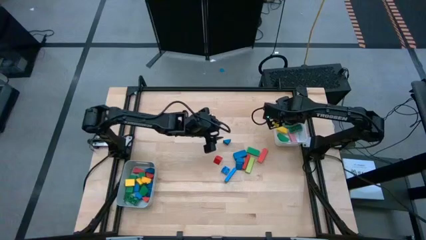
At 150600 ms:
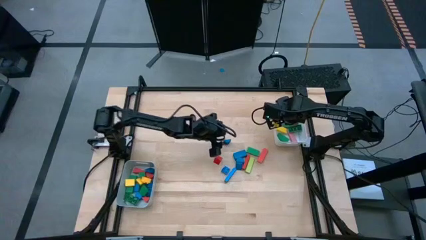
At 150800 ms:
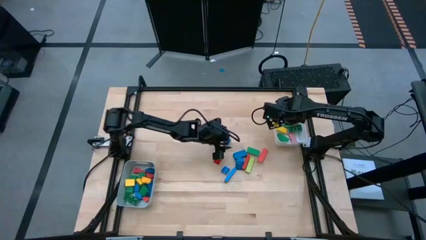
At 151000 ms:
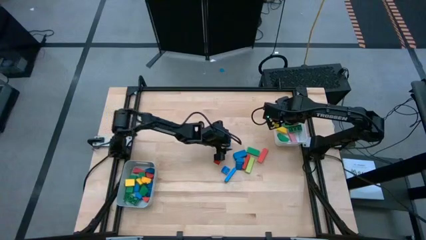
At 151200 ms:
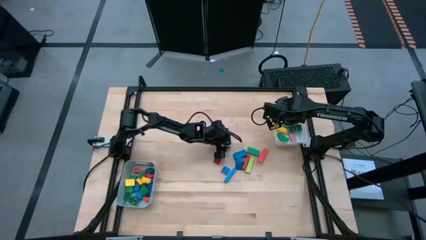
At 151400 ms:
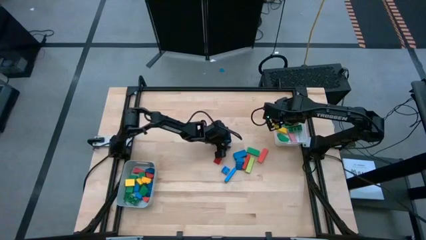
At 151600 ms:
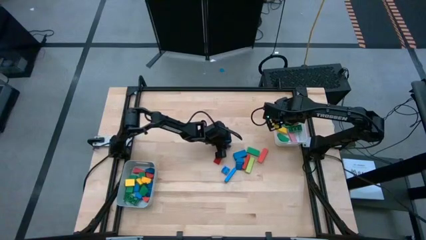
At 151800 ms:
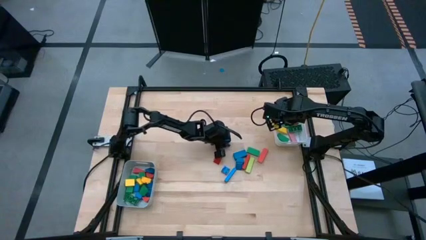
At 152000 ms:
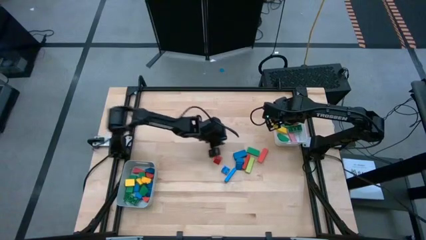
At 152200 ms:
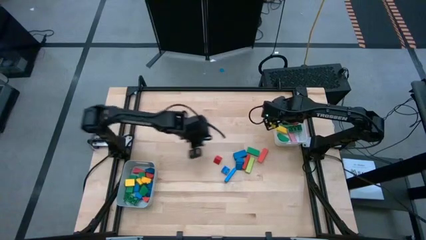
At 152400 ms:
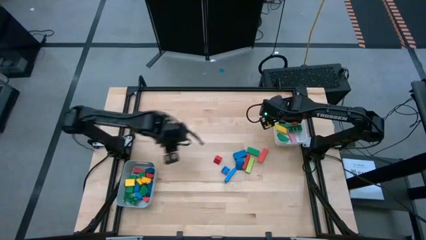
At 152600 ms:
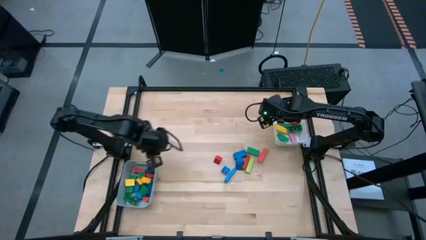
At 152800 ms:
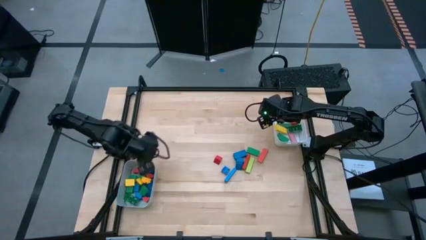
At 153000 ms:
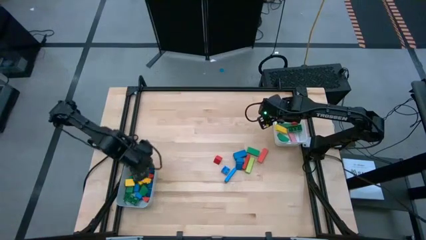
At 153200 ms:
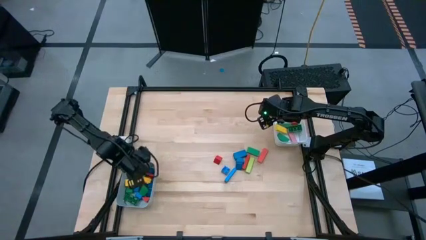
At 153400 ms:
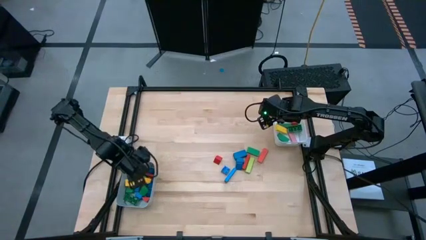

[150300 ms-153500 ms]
Task: Sort blocks by size
Put the blue triangle block into the gray bin

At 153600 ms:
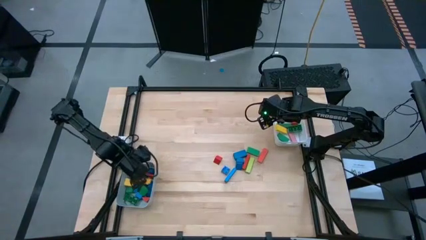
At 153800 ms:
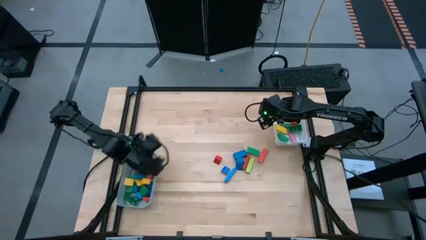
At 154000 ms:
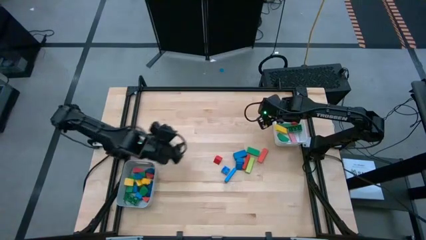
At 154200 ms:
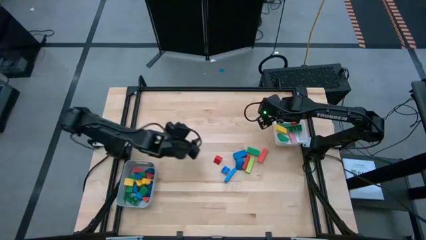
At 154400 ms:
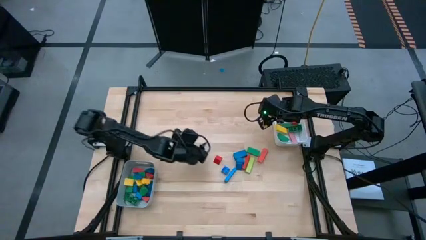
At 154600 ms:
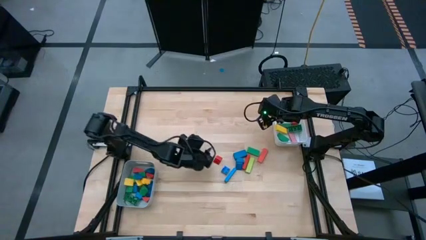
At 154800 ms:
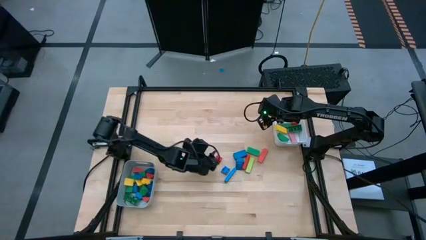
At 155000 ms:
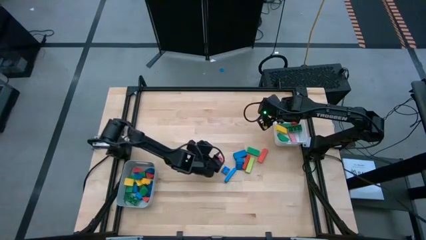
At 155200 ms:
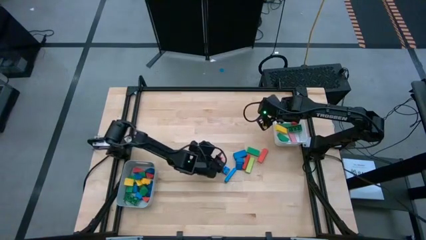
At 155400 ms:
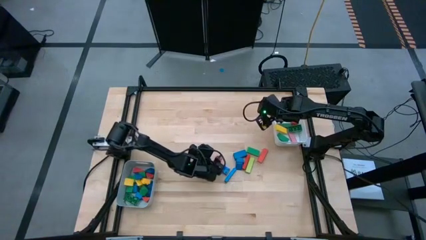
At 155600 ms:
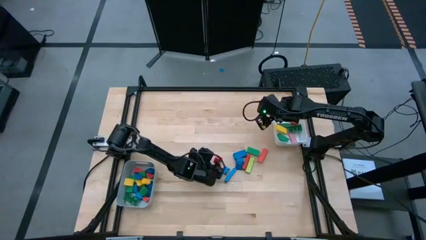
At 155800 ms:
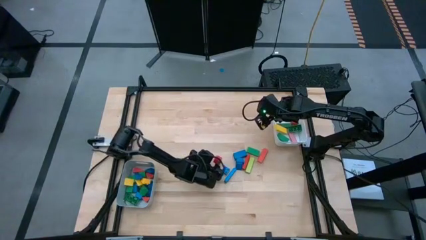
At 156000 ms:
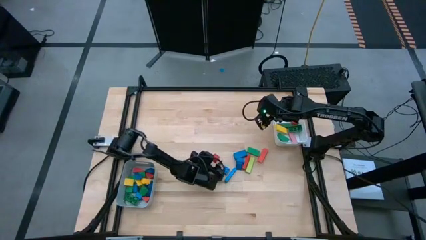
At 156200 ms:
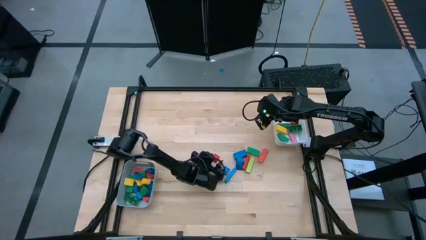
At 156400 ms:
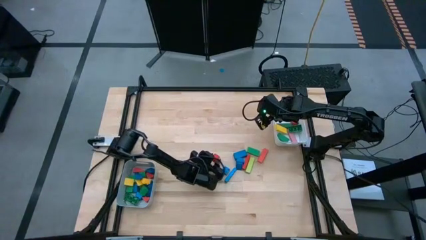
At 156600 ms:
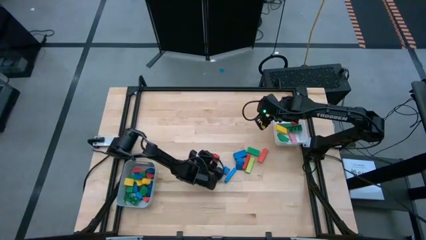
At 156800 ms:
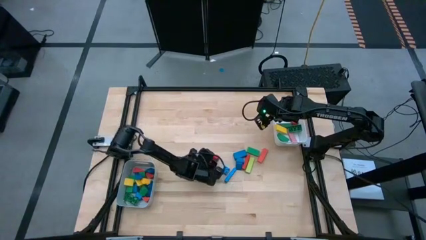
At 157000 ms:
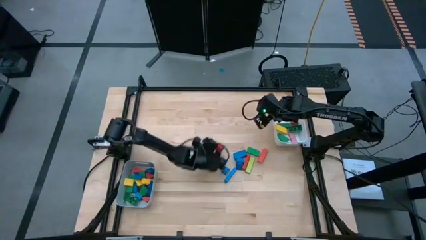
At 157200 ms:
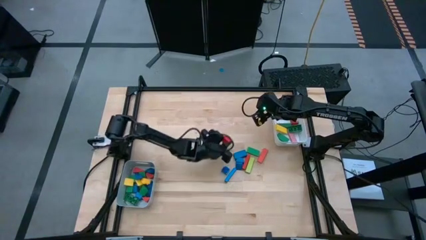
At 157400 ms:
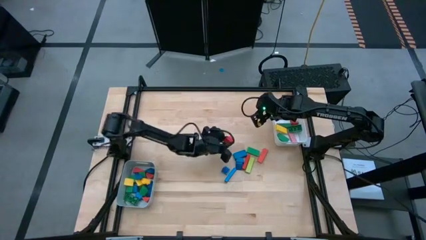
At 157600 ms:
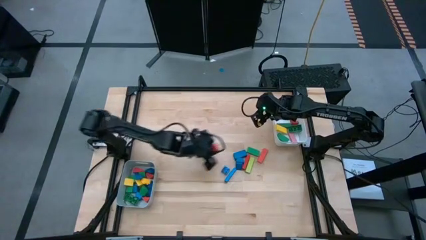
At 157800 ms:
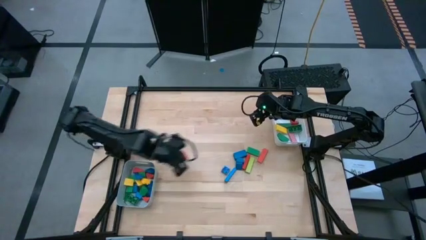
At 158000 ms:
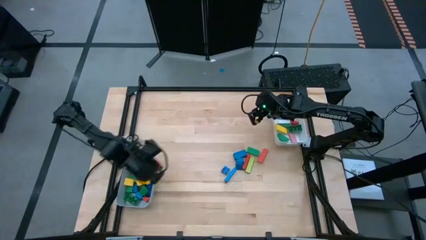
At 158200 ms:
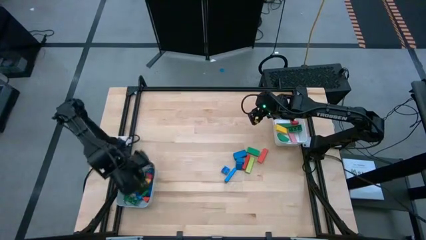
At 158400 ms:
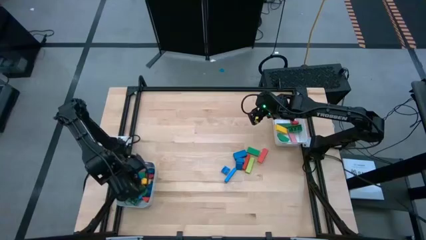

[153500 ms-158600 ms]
Put the orange triangle block into the gray bin

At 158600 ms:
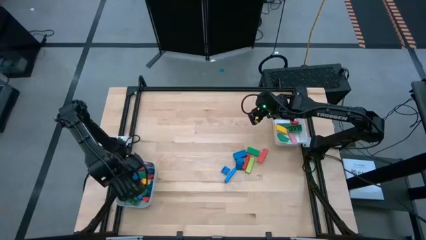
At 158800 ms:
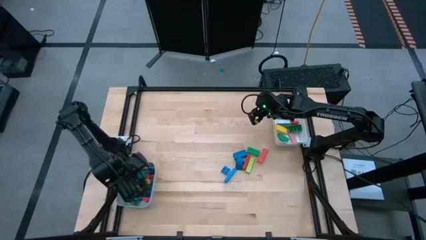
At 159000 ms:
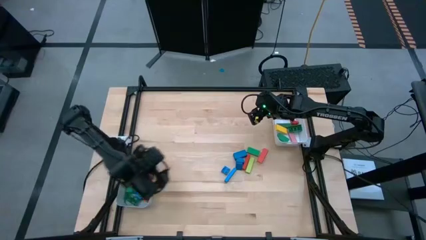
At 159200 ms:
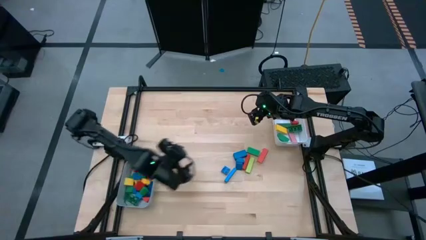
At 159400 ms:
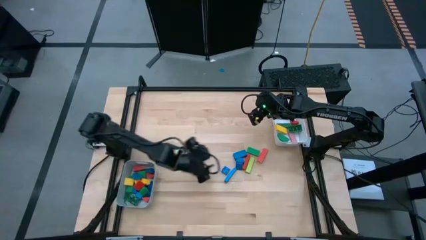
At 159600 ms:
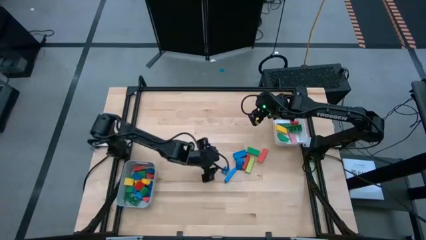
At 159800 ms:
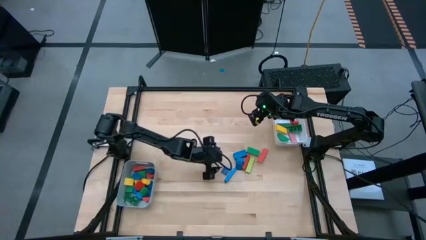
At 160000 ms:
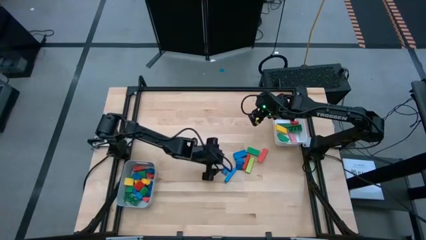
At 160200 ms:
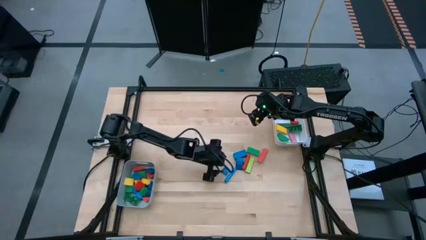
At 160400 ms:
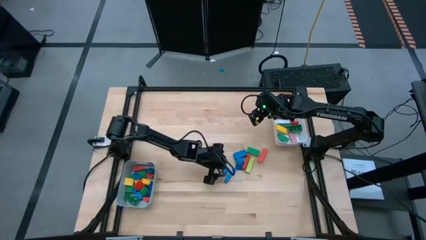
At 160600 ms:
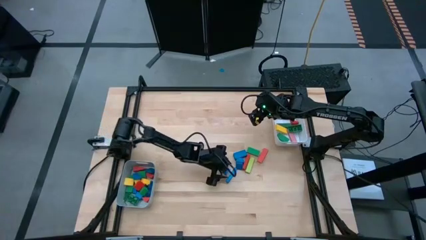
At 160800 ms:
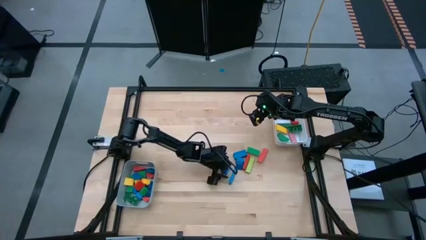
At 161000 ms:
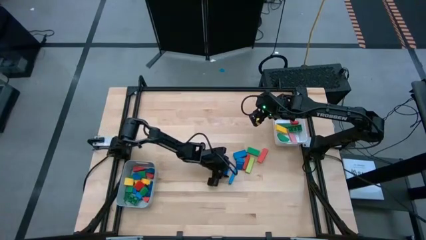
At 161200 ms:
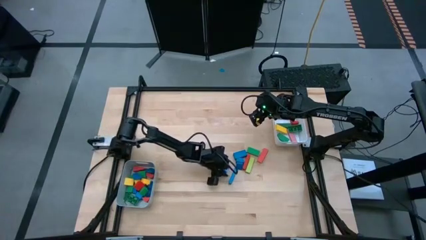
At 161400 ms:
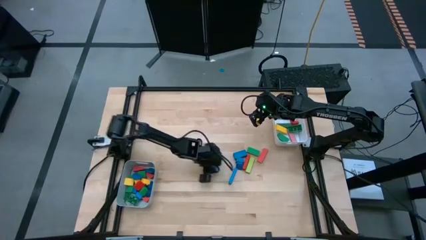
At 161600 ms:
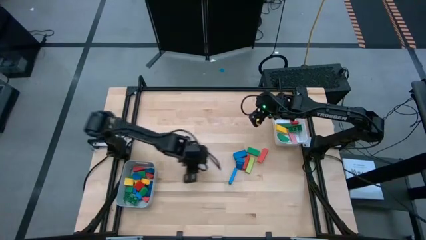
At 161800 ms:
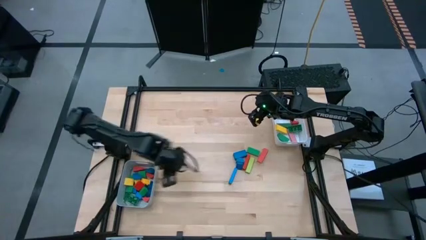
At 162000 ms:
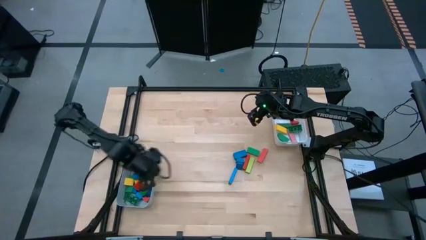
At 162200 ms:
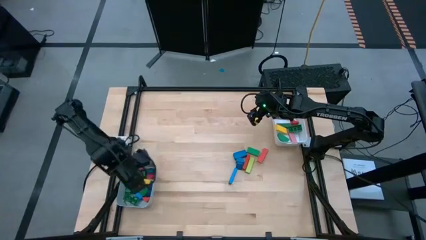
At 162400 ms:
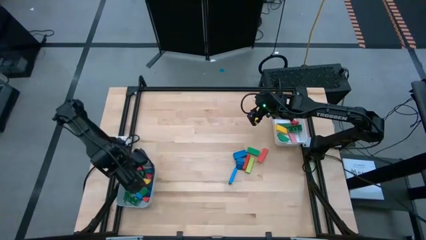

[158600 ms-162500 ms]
Put the blue game piece into the gray bin
